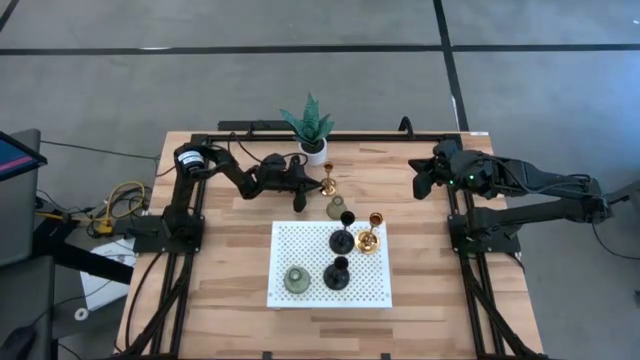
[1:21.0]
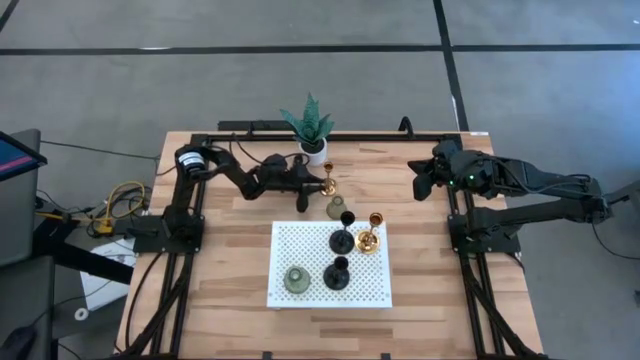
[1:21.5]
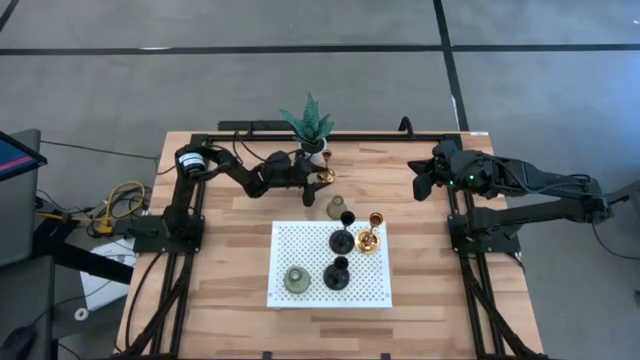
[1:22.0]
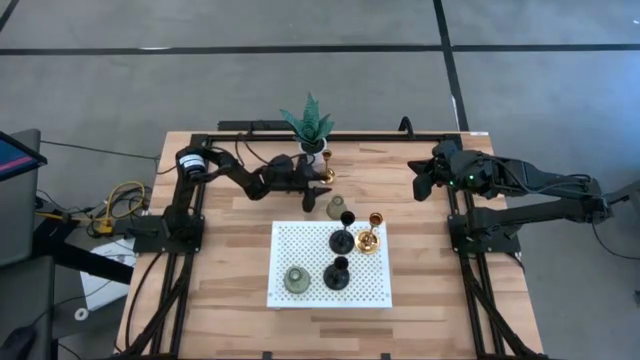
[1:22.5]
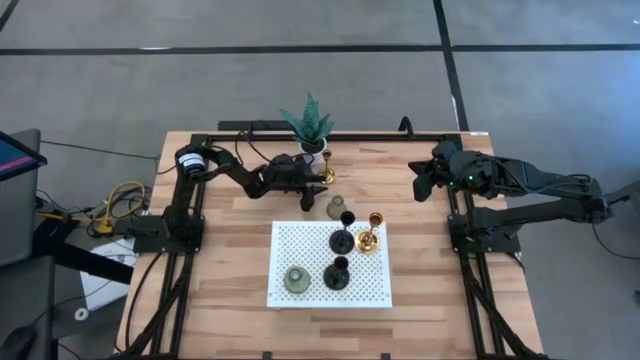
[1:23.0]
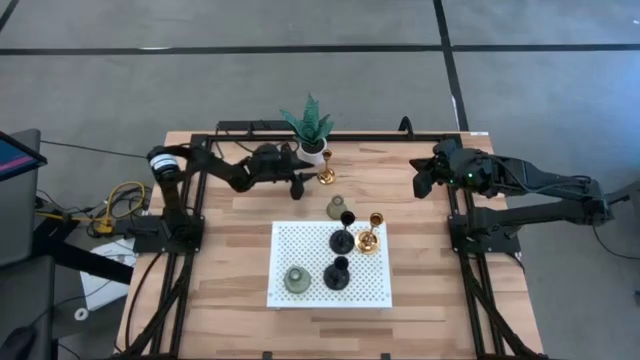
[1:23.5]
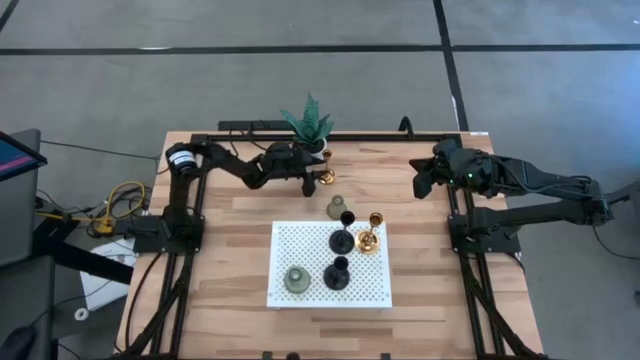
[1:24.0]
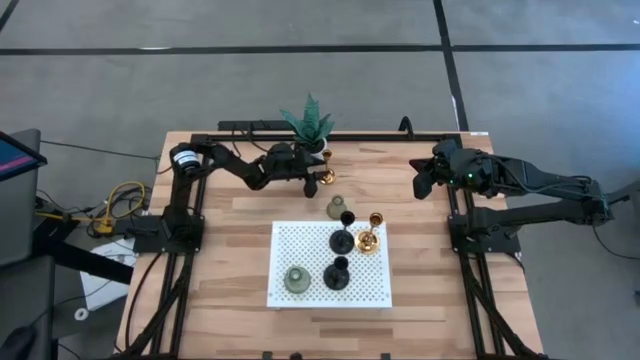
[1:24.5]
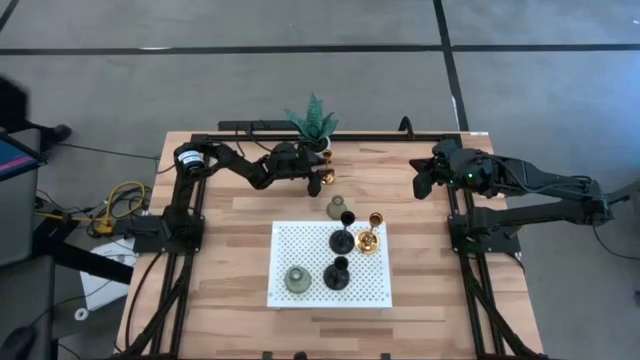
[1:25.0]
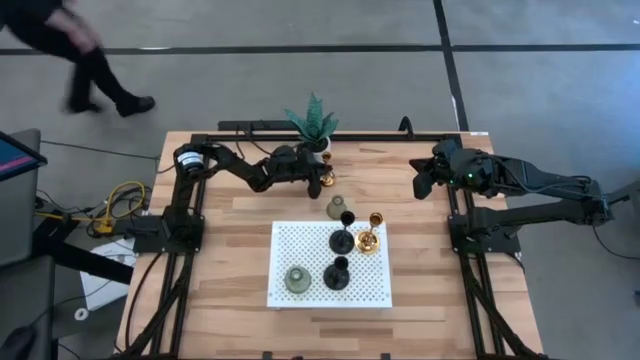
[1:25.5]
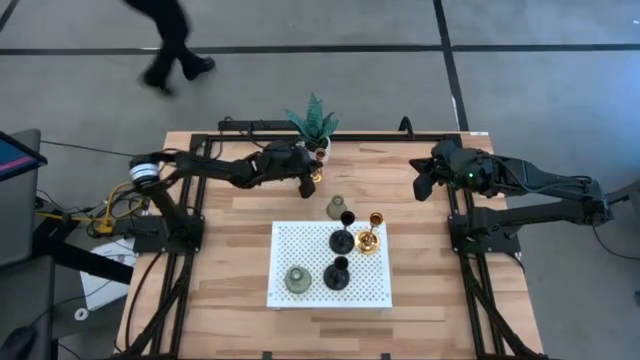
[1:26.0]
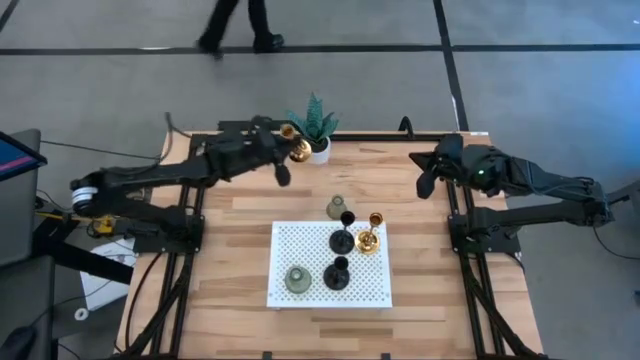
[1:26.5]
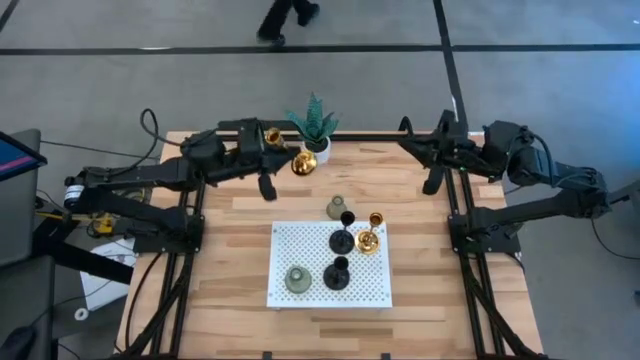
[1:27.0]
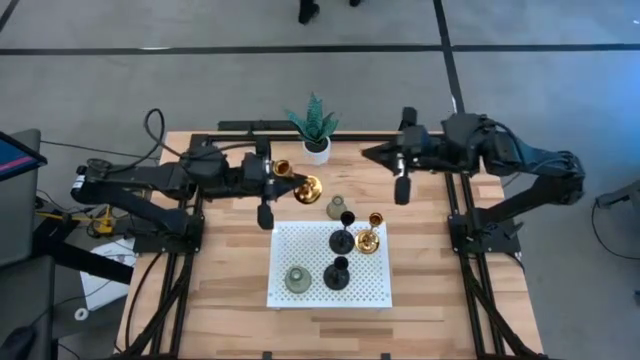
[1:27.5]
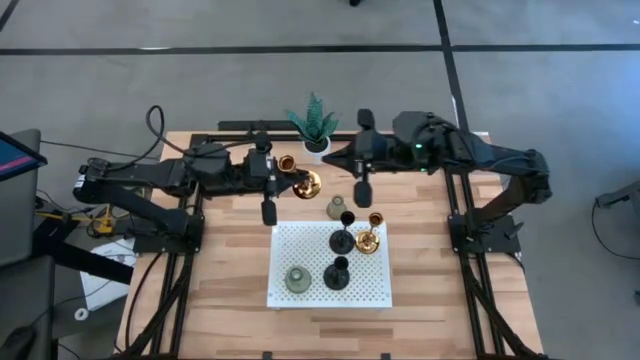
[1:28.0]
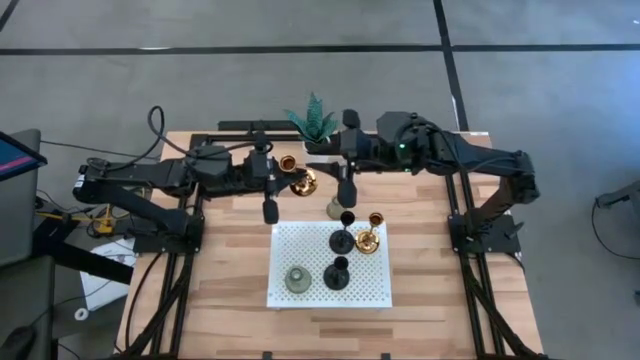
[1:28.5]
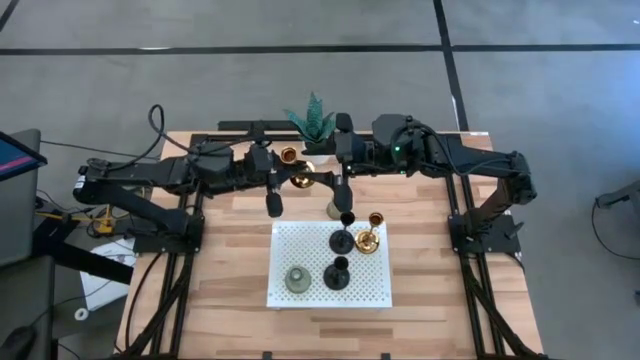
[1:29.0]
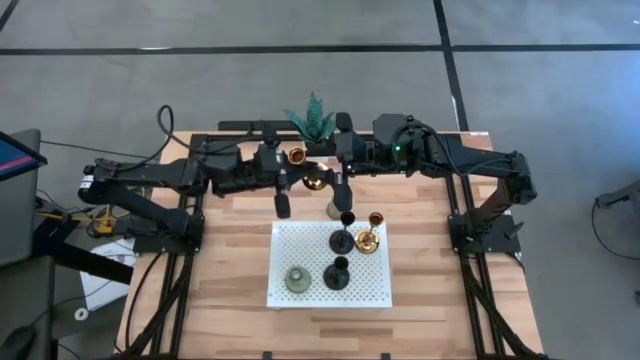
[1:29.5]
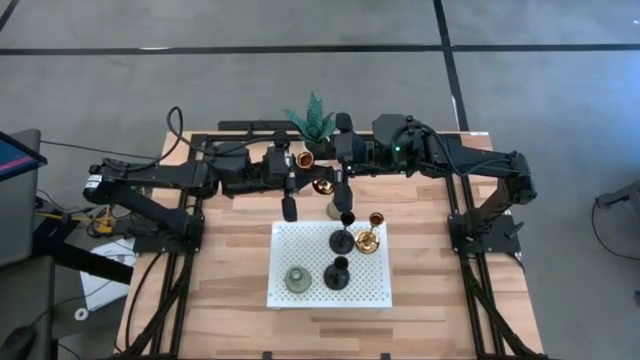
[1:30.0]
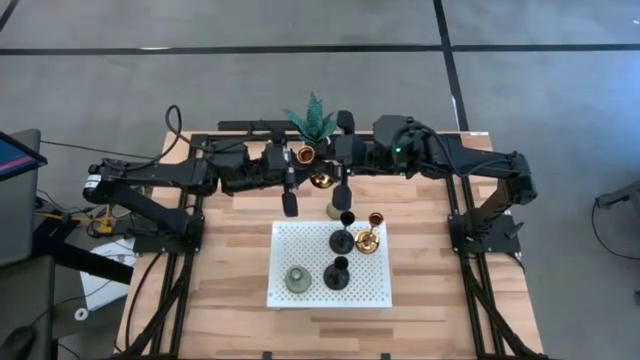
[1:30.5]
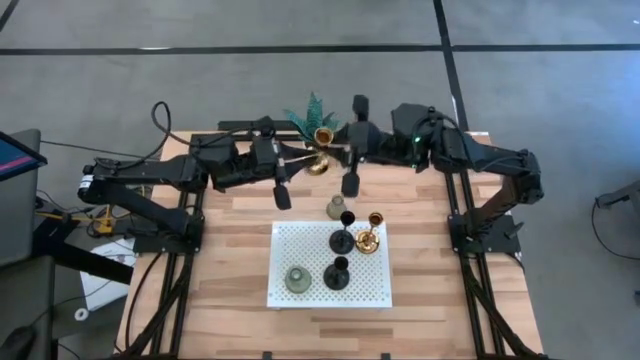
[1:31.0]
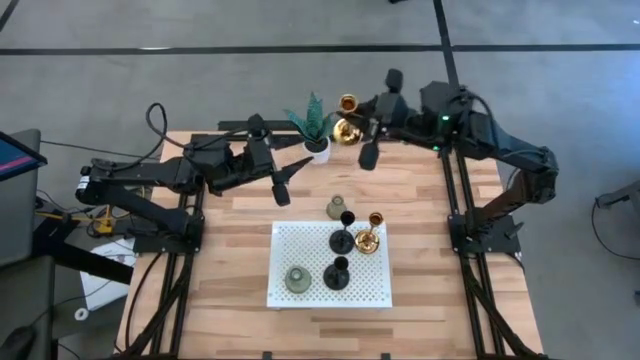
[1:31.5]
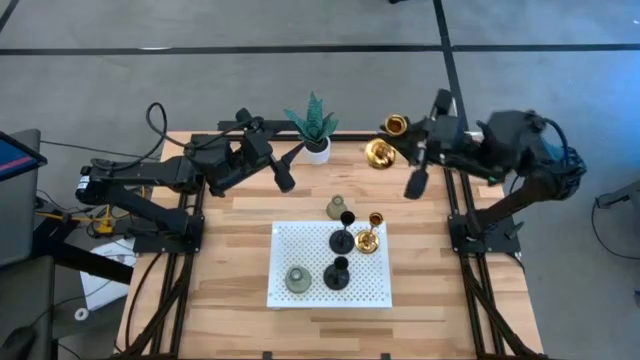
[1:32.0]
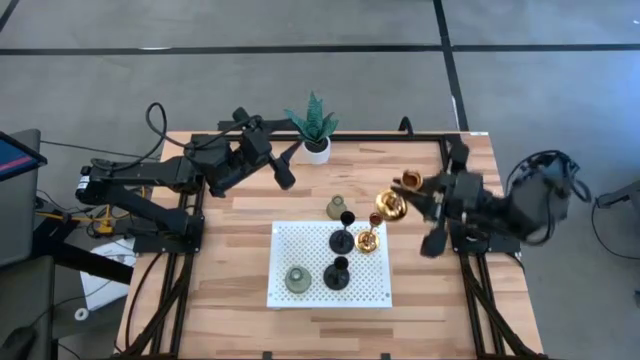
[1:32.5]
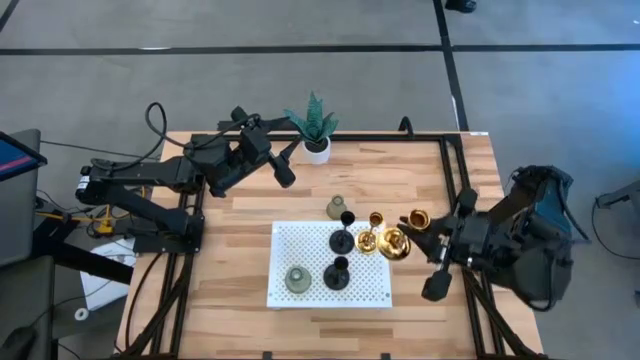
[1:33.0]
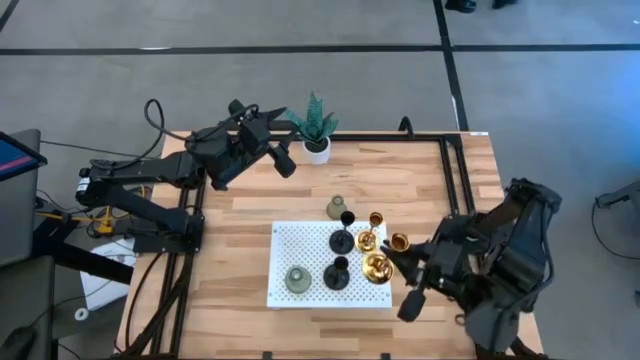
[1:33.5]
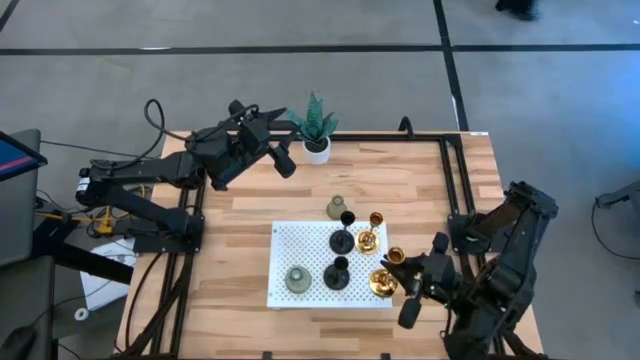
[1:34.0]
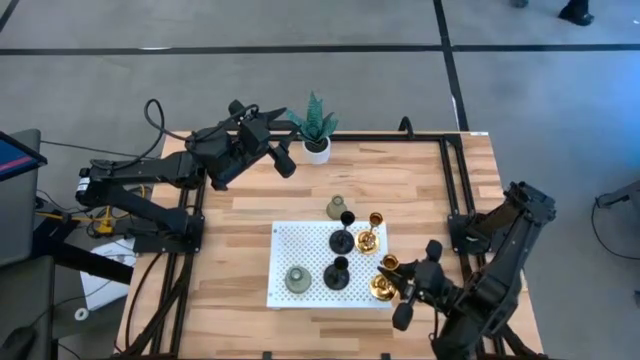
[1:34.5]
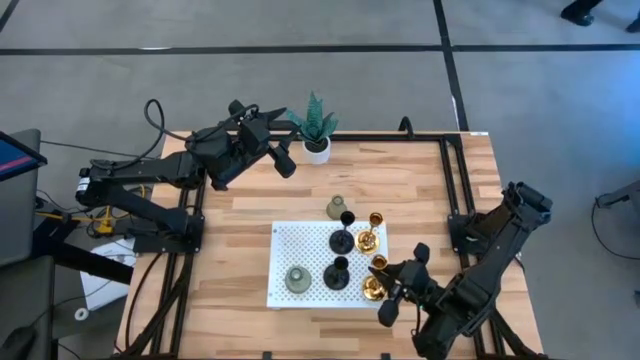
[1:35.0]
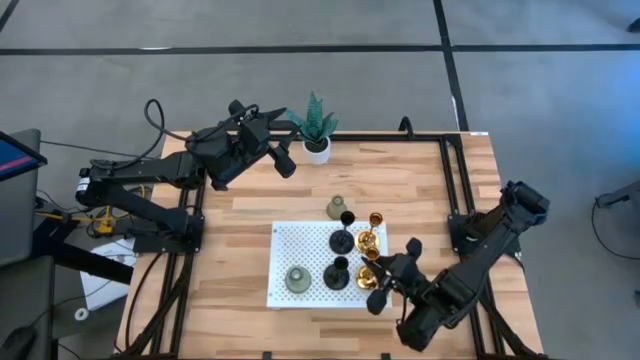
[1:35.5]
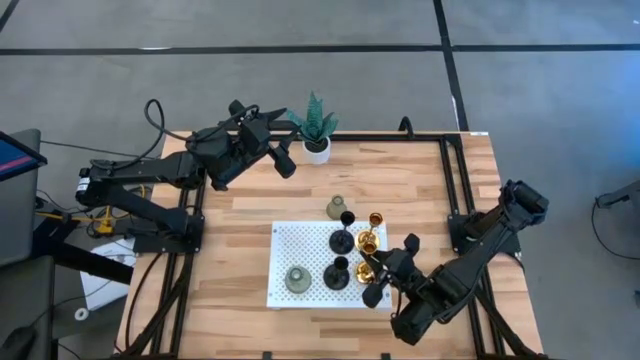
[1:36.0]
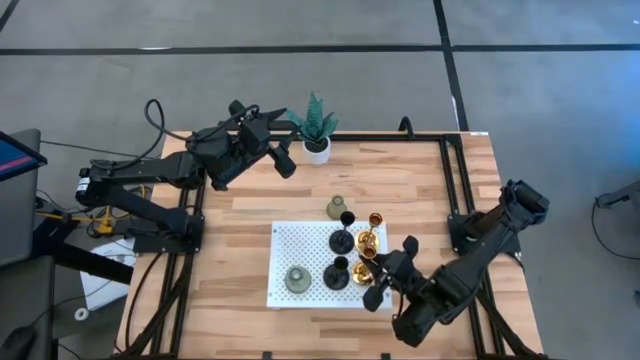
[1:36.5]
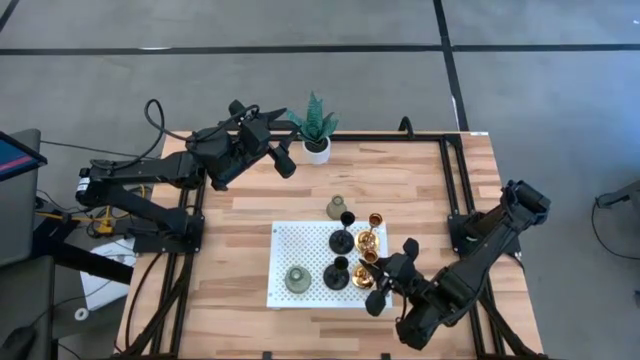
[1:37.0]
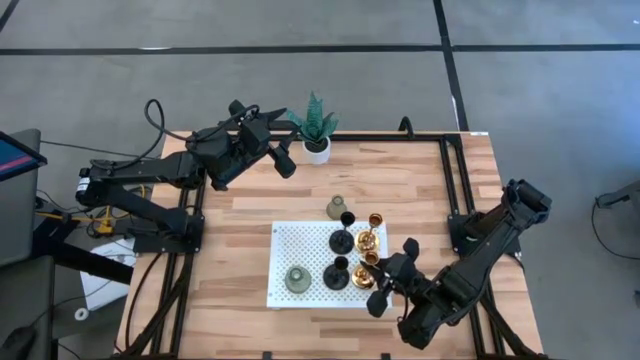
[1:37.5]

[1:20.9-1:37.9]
Task: Pick & Place candle stick holders
Align the gold candle holder with the other gold candle holder on the shelf

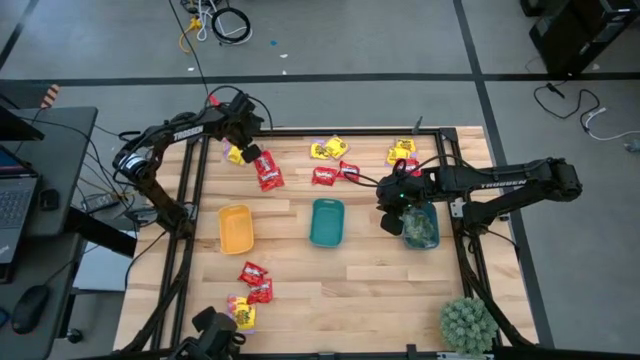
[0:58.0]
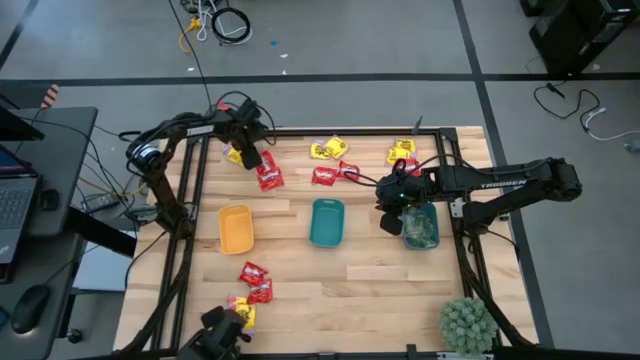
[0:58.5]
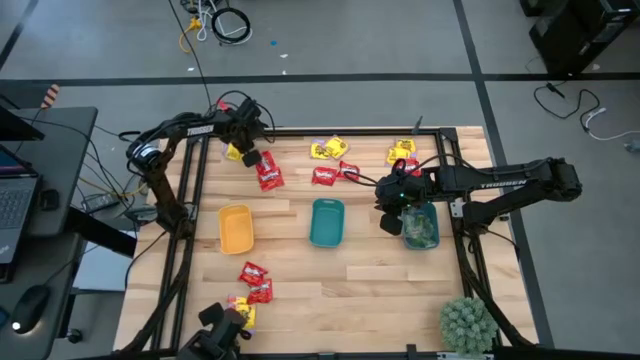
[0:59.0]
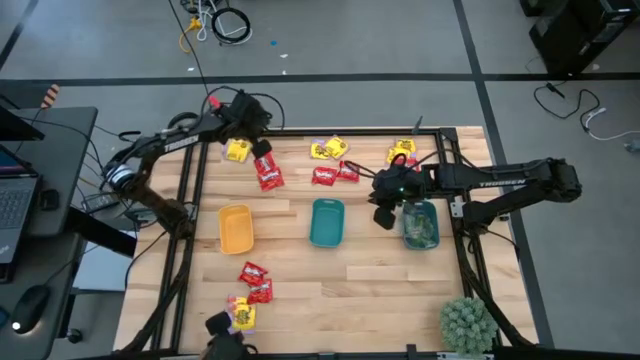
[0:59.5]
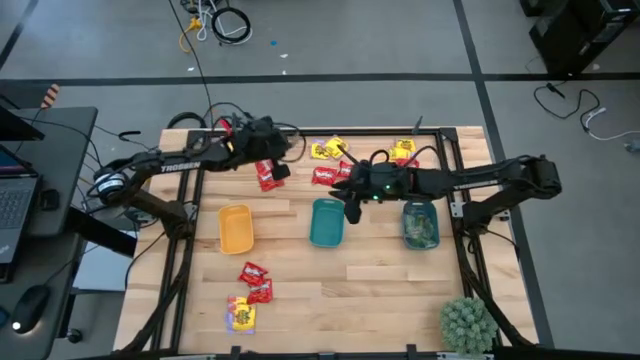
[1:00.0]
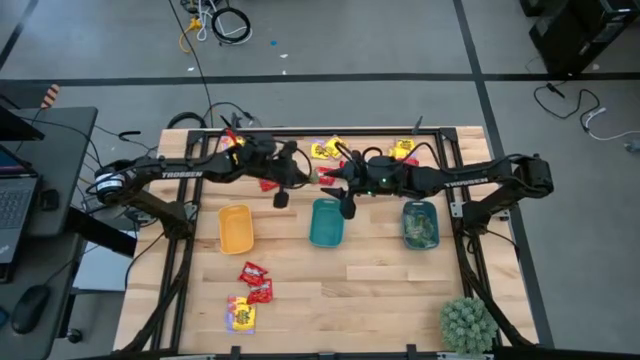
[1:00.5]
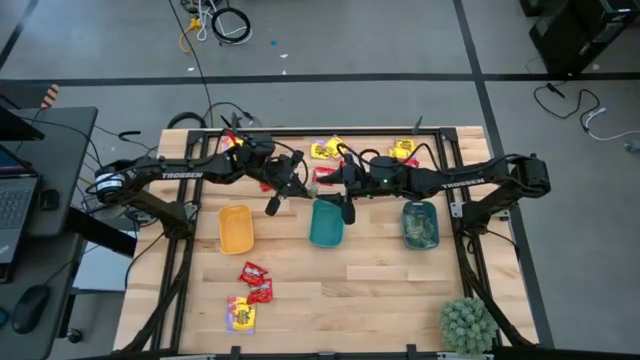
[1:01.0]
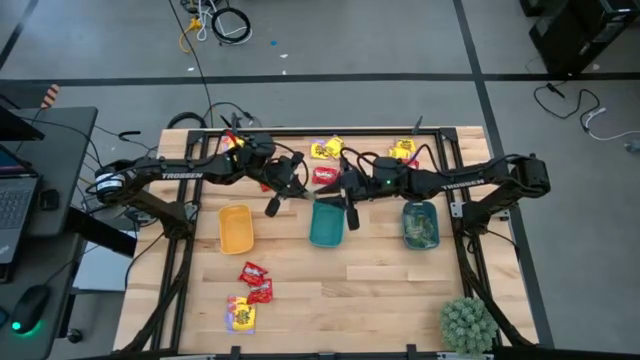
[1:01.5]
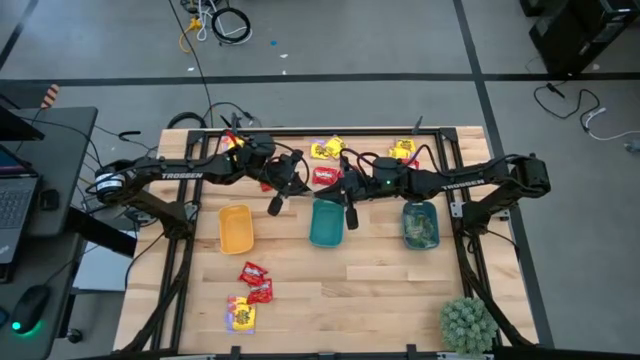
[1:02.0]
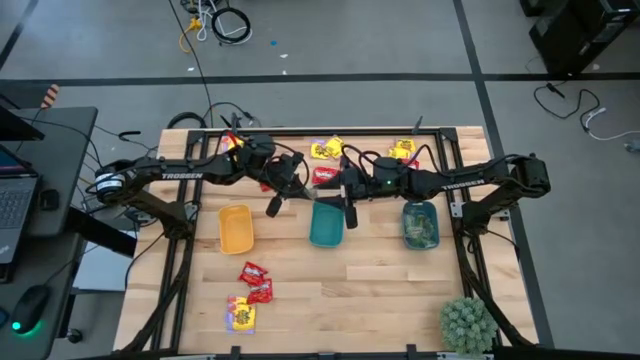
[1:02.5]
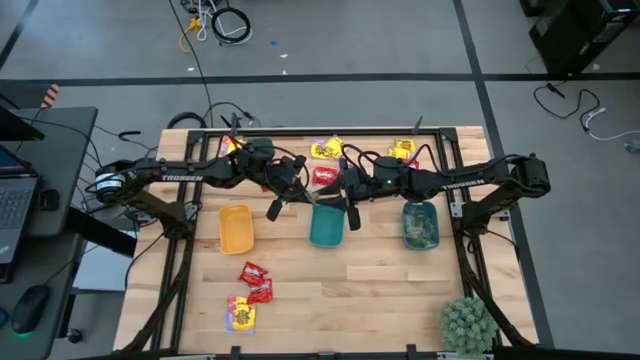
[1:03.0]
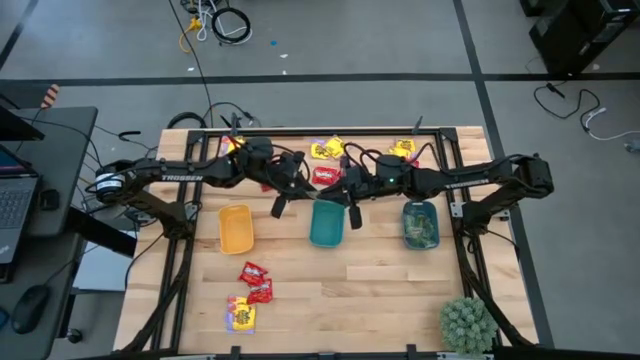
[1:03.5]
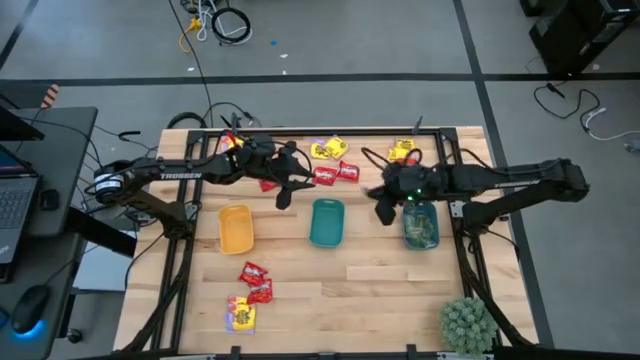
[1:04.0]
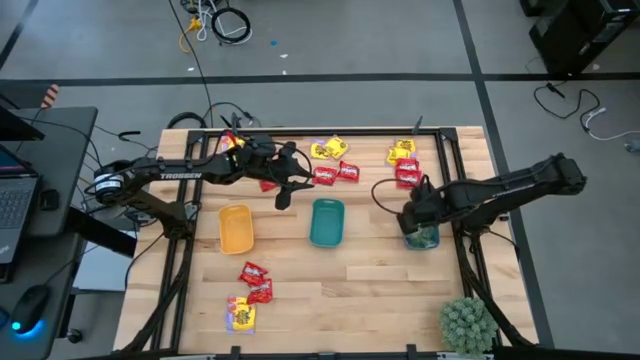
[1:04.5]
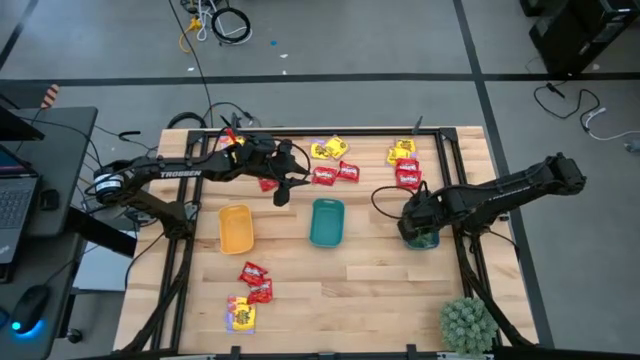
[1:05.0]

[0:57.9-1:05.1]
Task: Sort candy
Put the green transparent candy into the blue bin
